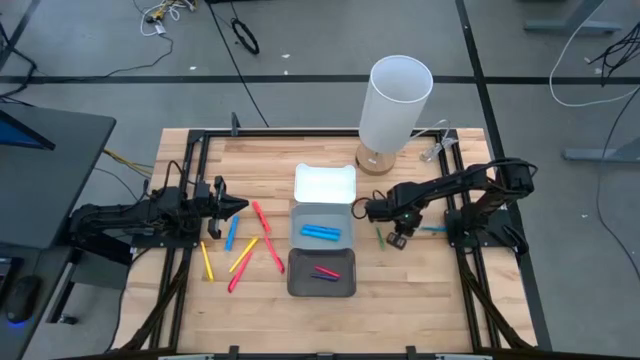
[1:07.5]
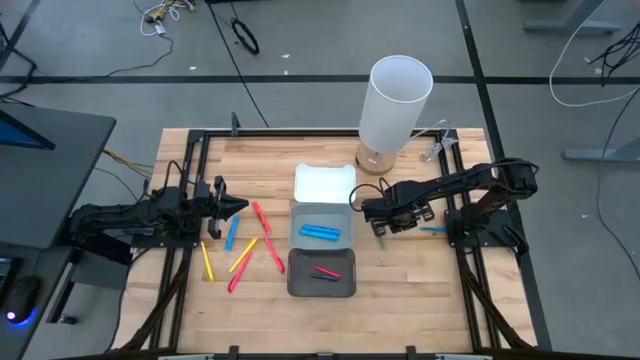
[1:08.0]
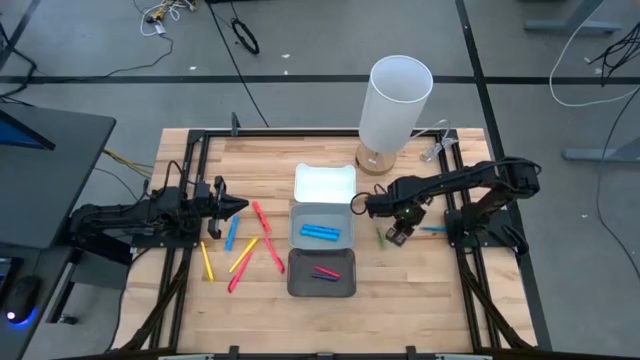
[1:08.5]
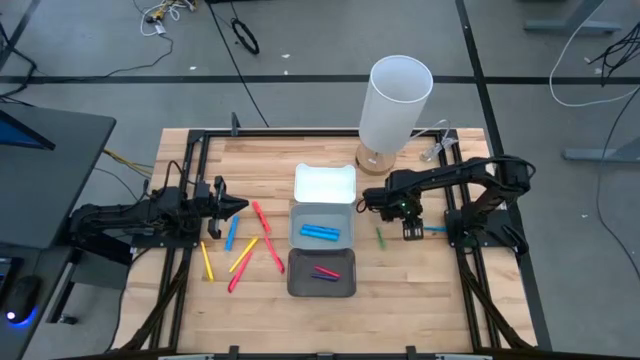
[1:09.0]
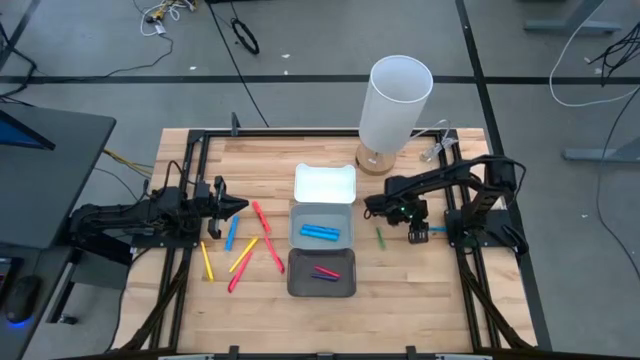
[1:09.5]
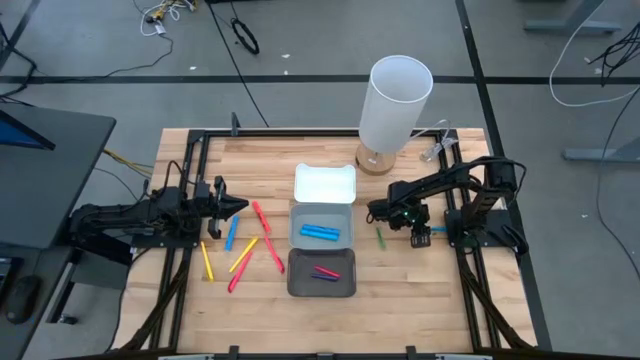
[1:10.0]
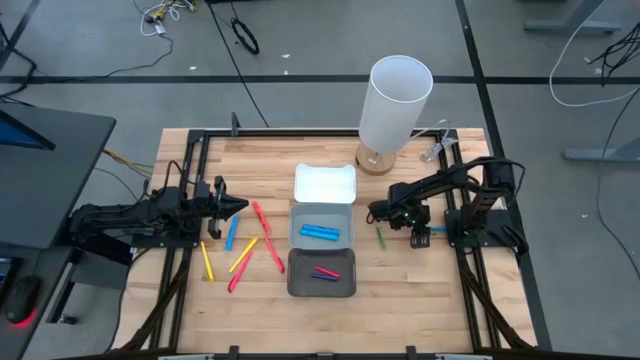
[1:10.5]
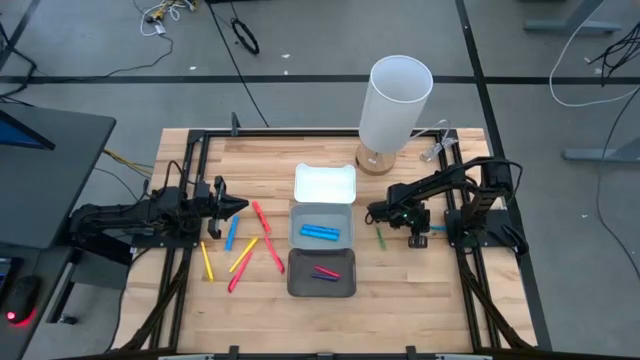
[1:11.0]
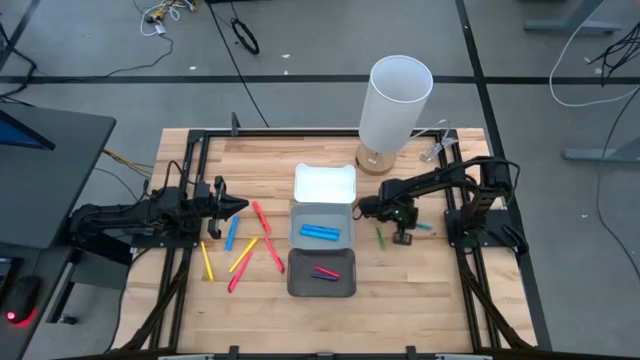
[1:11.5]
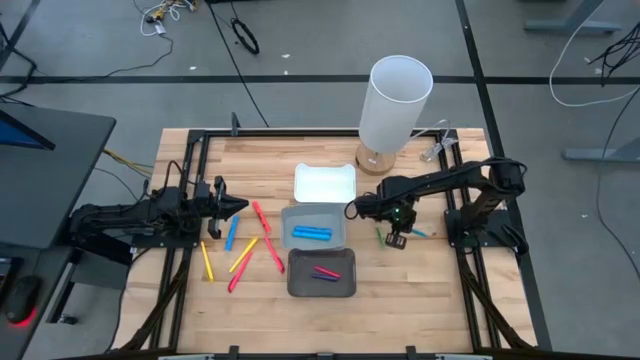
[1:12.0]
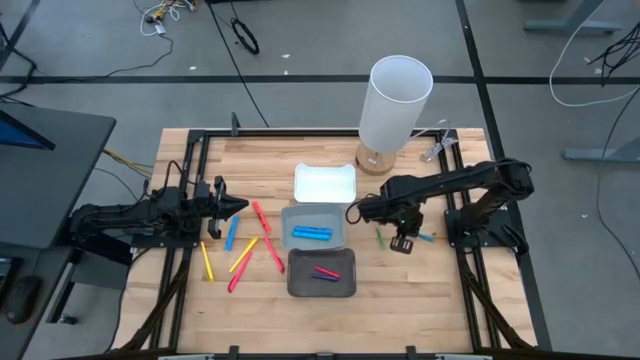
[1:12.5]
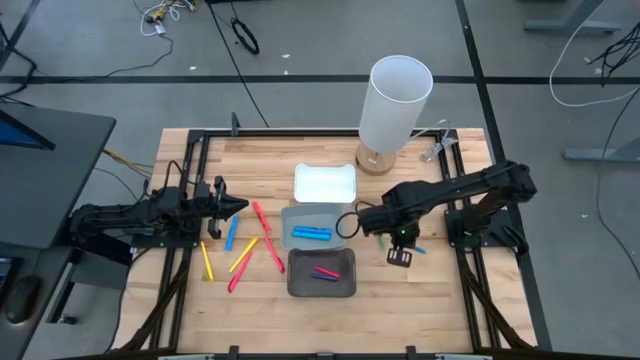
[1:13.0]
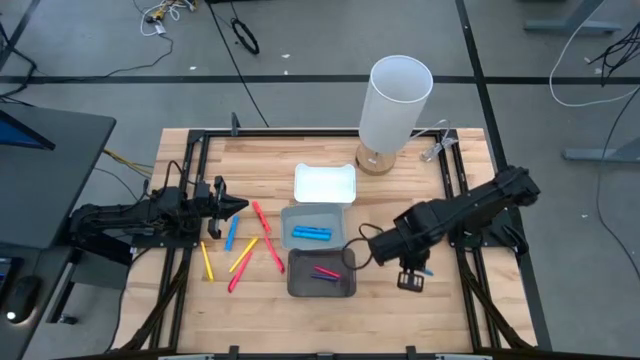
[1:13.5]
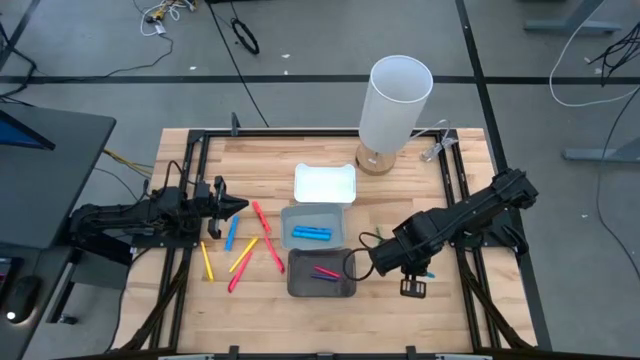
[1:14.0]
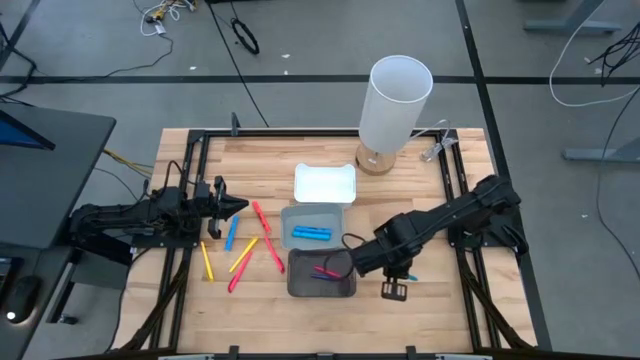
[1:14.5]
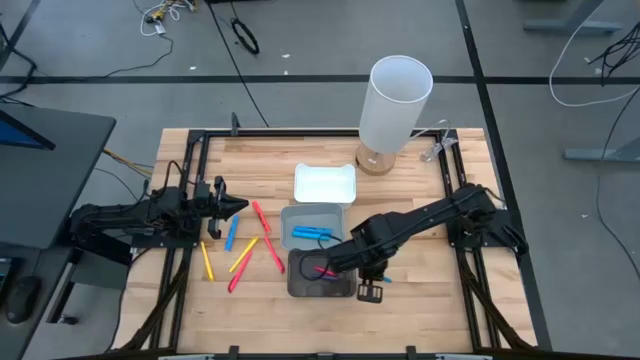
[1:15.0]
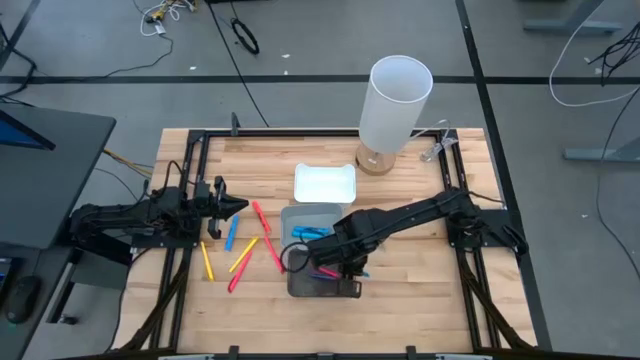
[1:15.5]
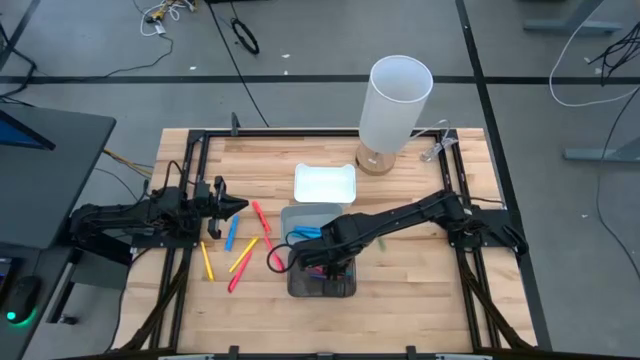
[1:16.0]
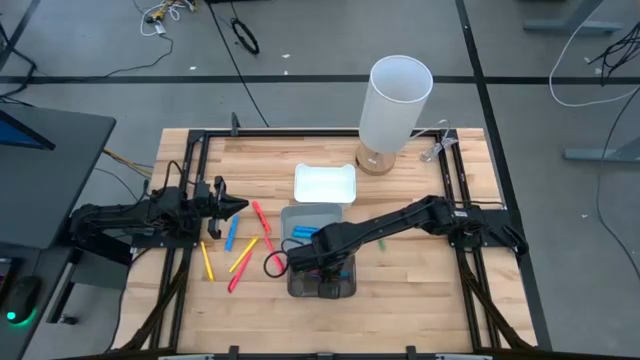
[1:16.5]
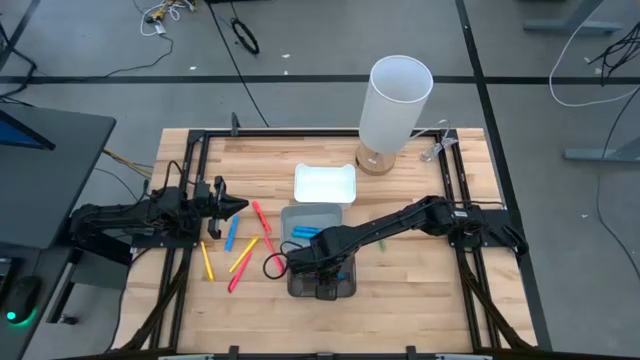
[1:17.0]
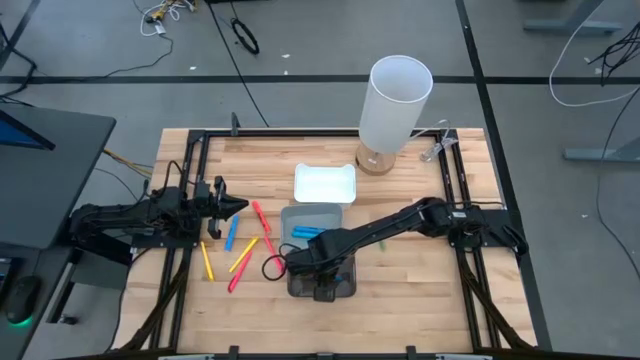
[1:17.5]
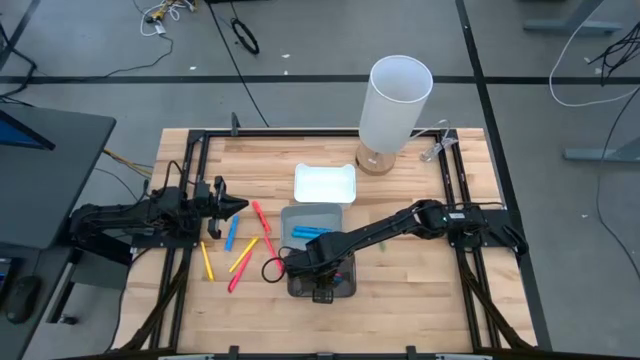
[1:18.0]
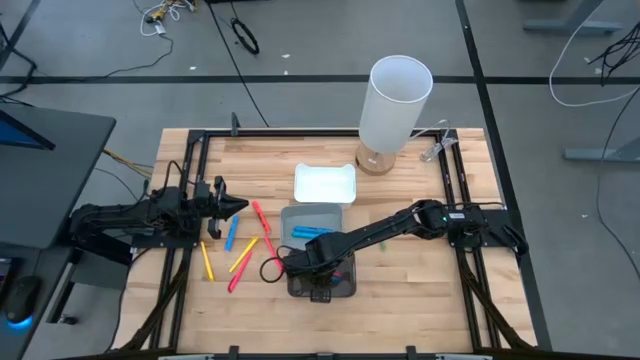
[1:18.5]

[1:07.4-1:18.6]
Task: Pick & Place Markers
Put the blue pen into the black transparent bin

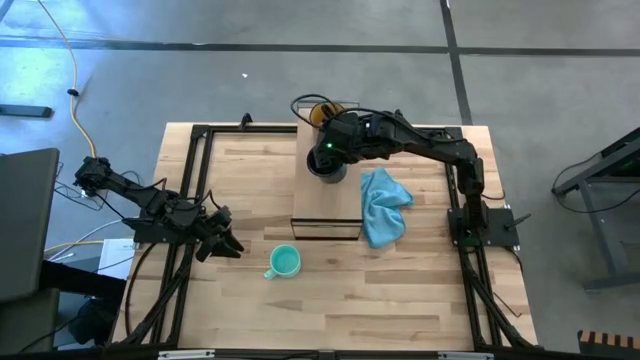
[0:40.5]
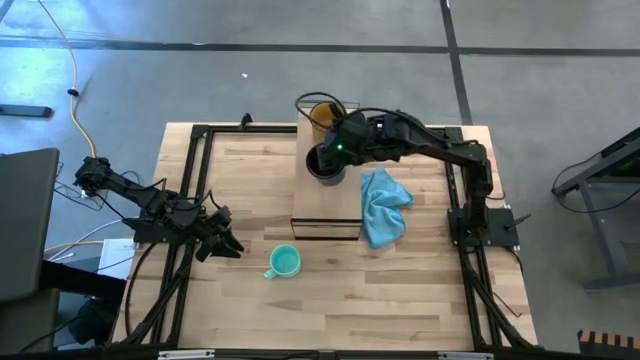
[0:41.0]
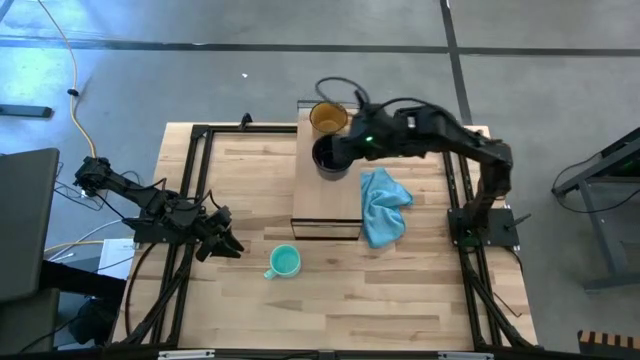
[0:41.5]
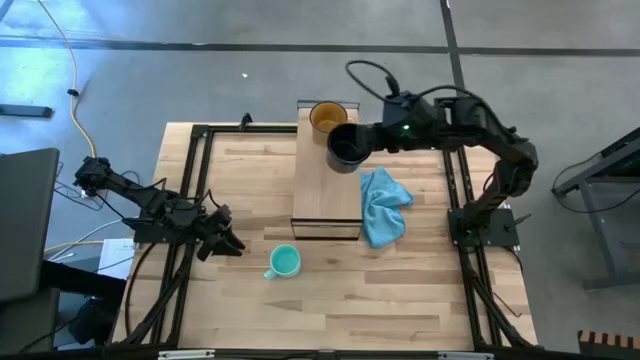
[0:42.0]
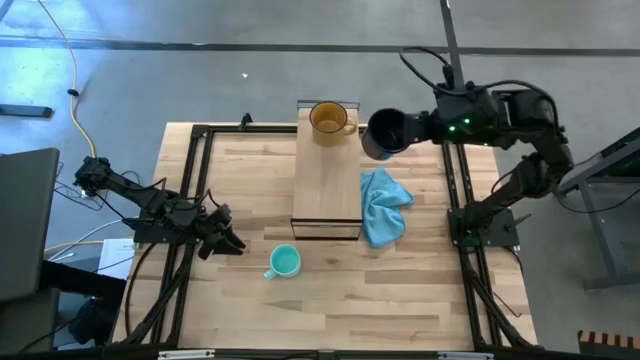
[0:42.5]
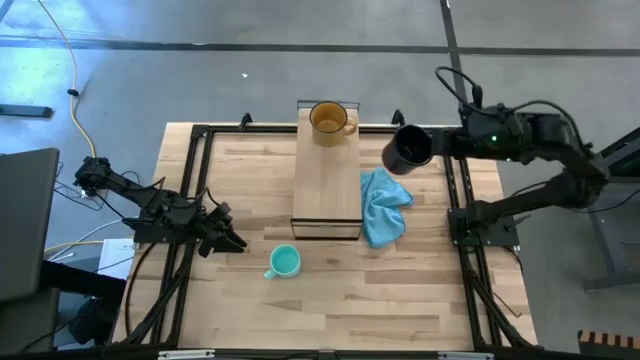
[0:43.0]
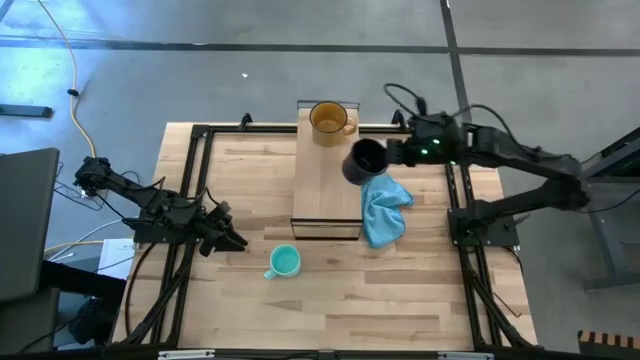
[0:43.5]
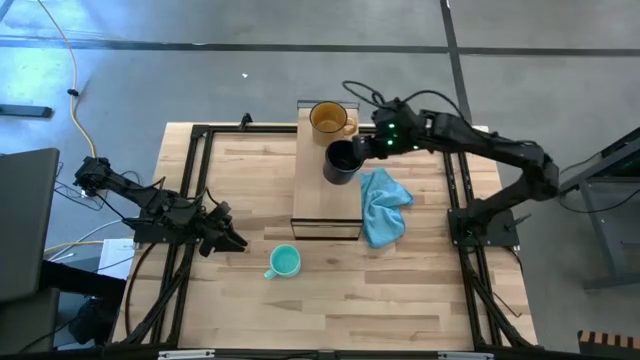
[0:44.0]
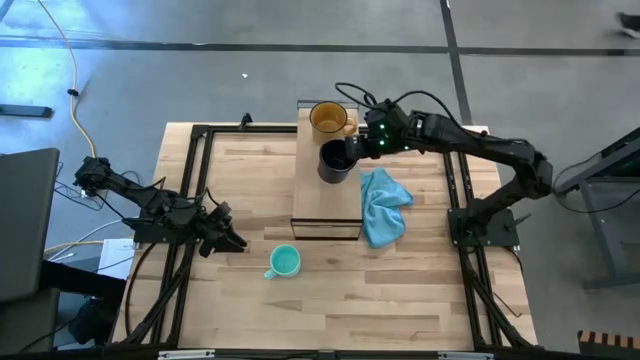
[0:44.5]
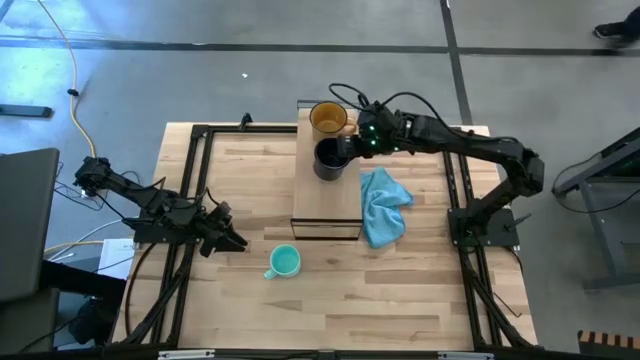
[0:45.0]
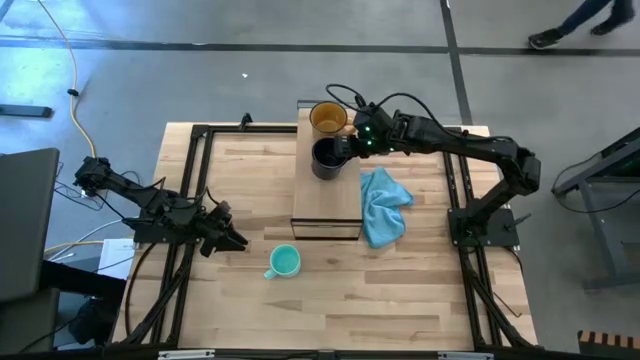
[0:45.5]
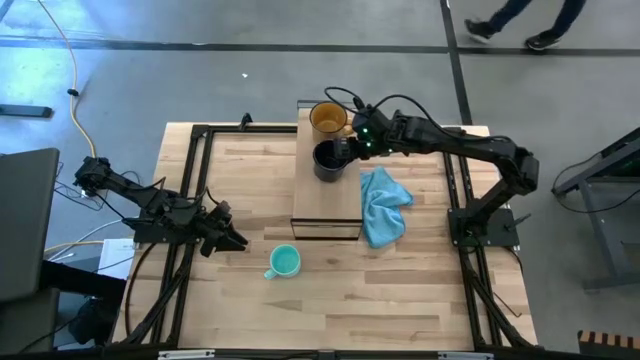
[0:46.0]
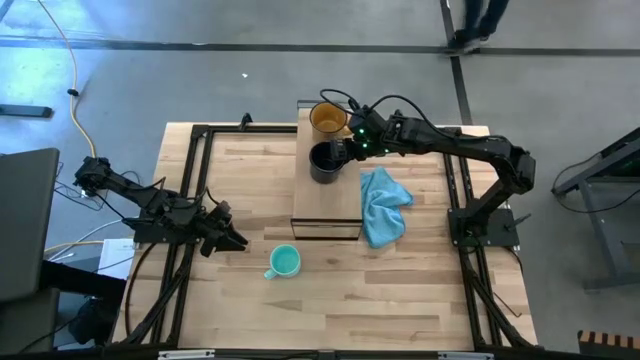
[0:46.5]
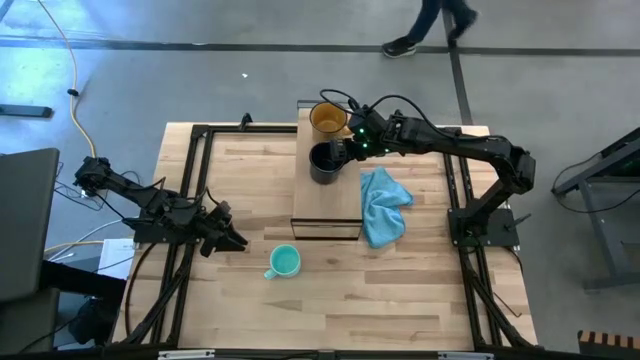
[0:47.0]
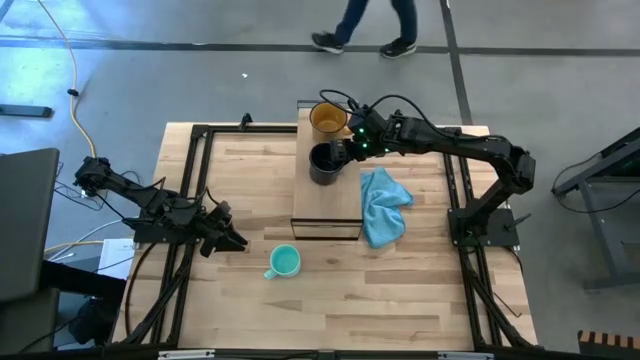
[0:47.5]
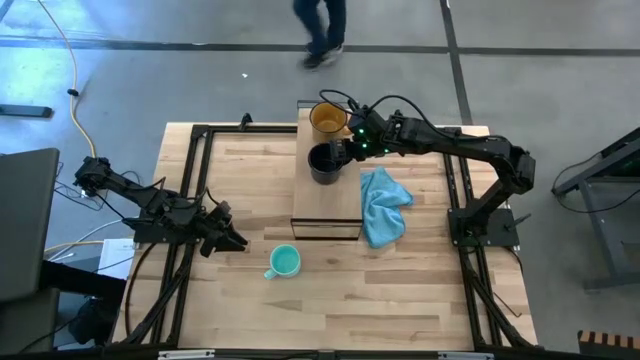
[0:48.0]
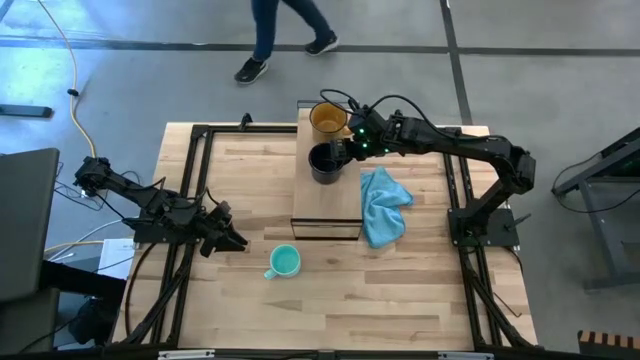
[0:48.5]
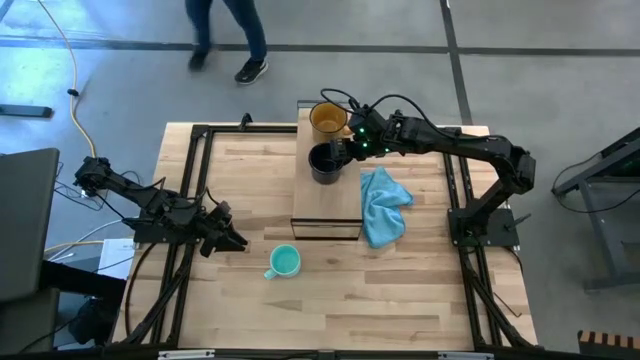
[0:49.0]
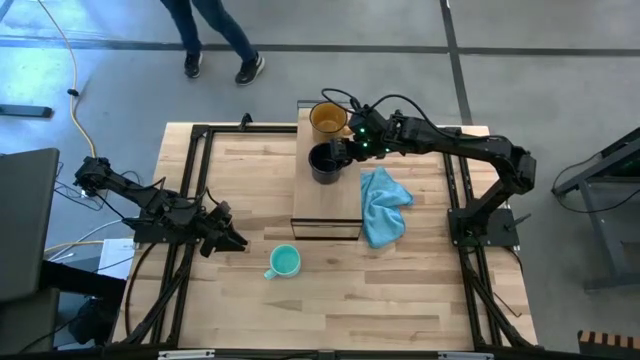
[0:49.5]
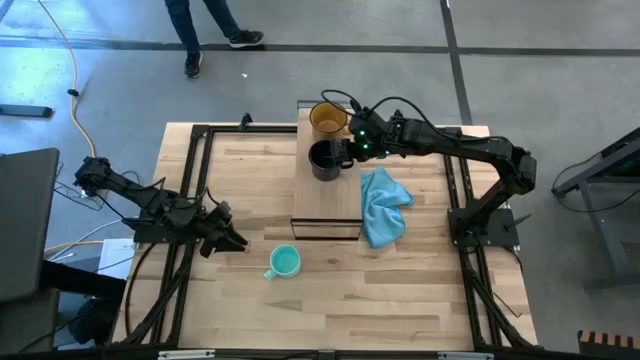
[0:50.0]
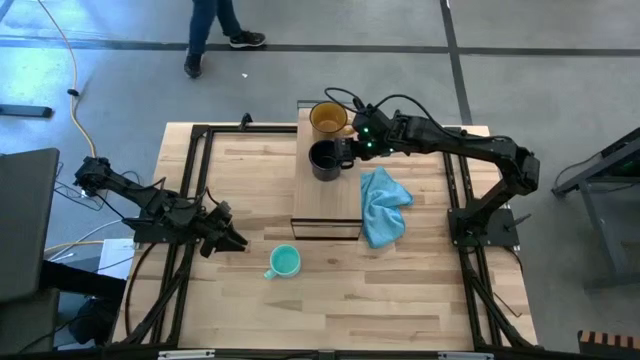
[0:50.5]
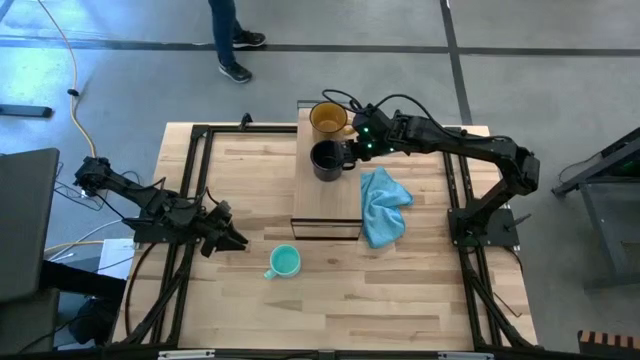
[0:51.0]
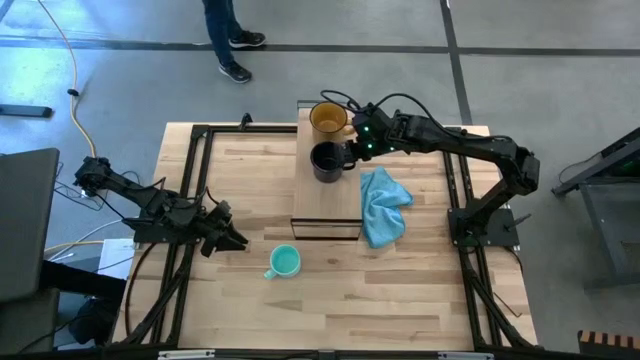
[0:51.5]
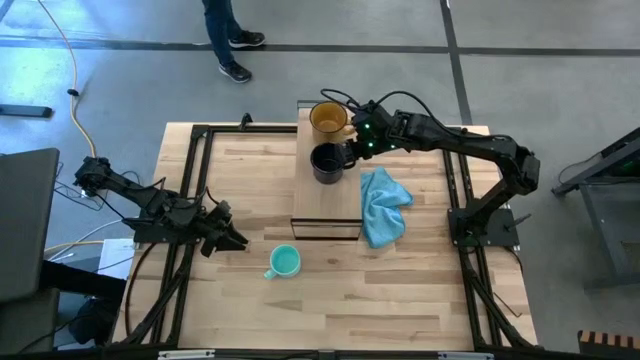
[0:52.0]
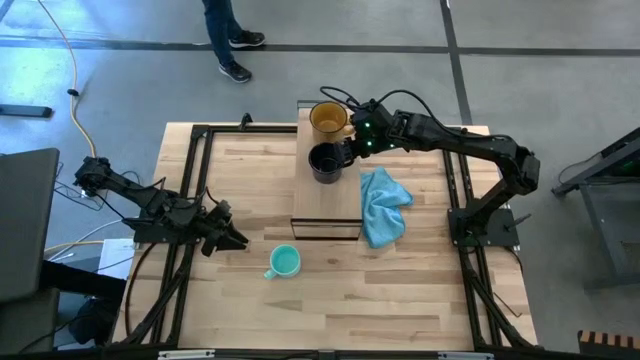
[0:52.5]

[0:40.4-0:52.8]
Task: Stack small to large cups/mugs on shelf
Put the dark blue mug on the shelf
